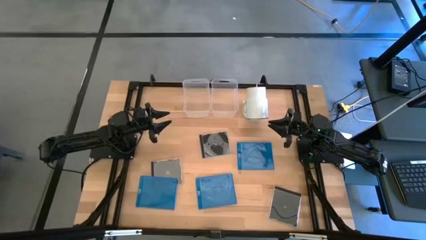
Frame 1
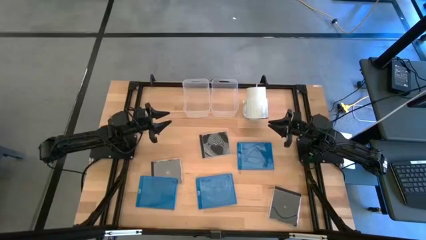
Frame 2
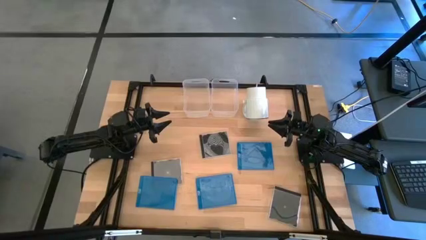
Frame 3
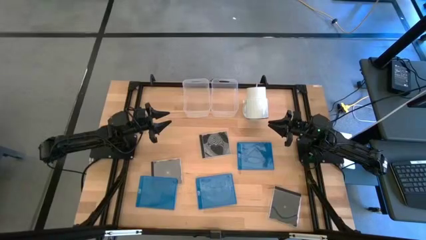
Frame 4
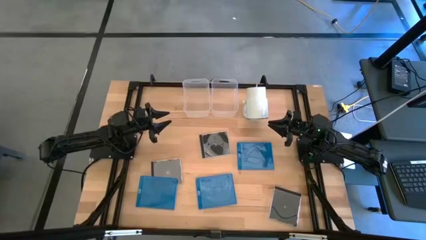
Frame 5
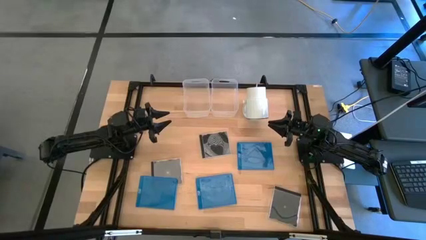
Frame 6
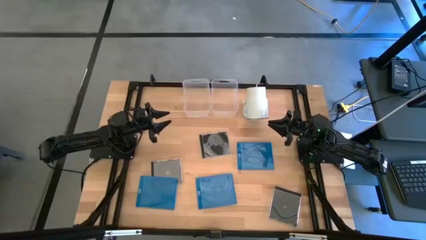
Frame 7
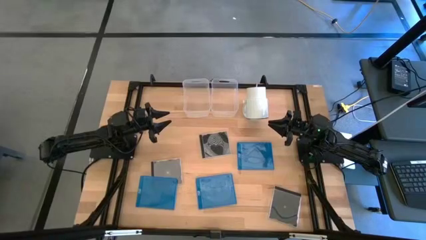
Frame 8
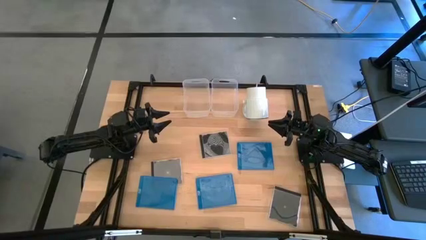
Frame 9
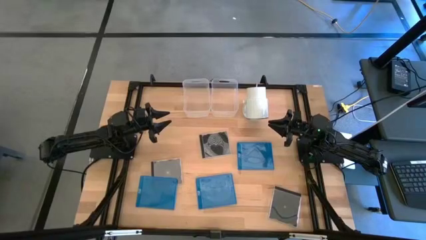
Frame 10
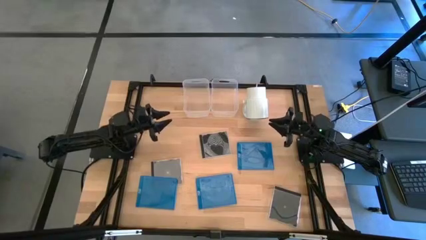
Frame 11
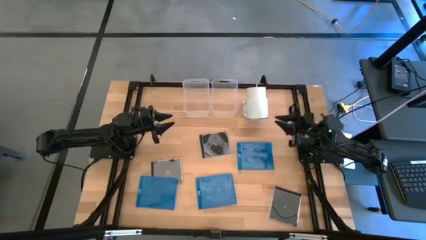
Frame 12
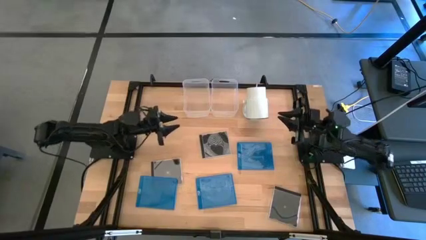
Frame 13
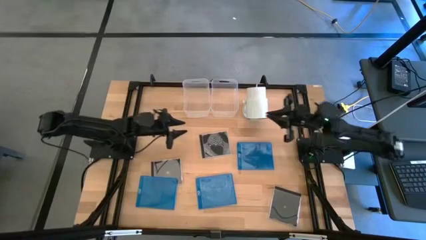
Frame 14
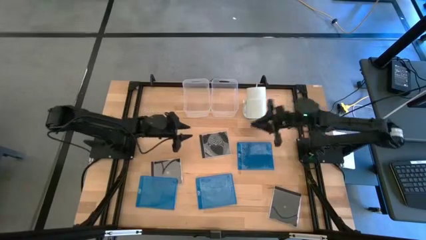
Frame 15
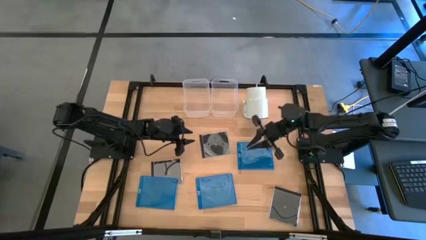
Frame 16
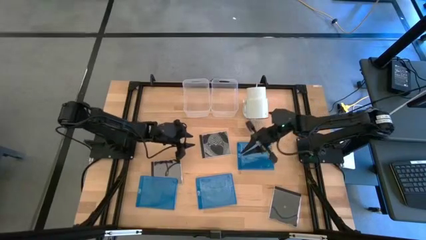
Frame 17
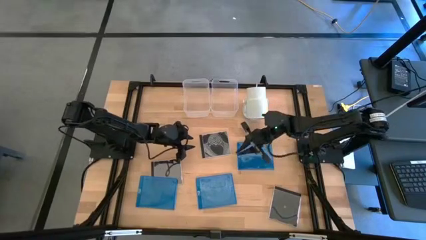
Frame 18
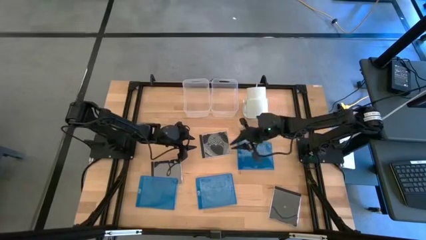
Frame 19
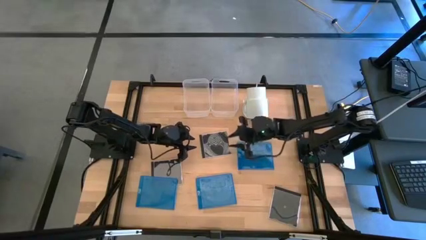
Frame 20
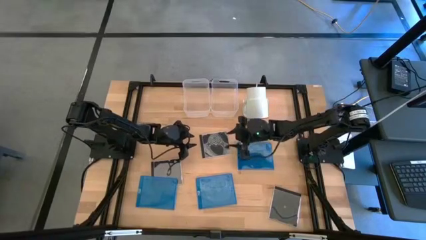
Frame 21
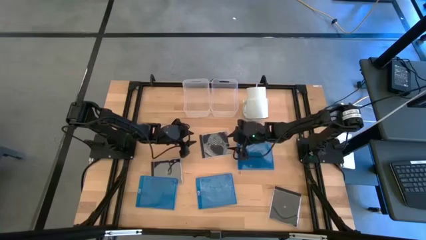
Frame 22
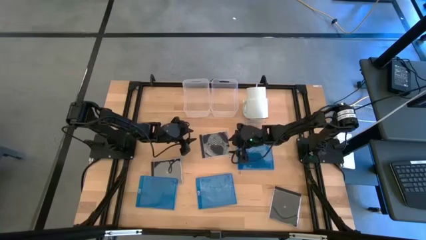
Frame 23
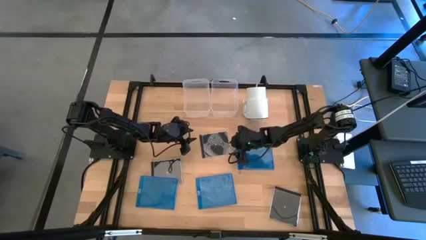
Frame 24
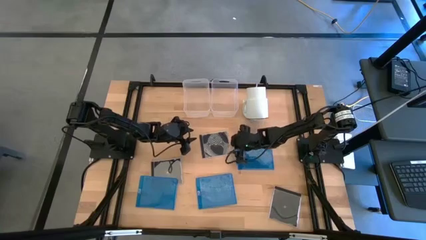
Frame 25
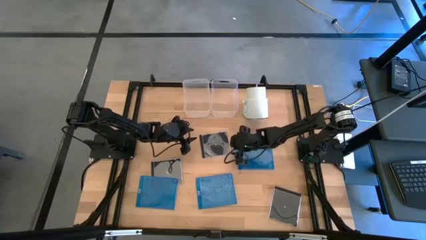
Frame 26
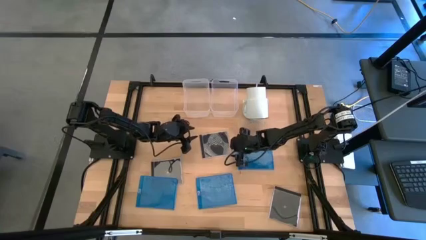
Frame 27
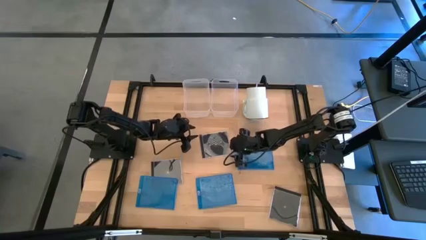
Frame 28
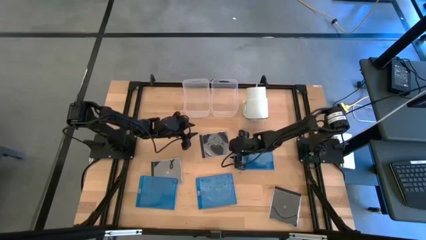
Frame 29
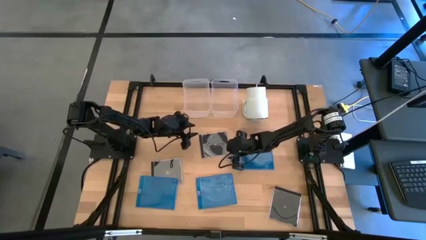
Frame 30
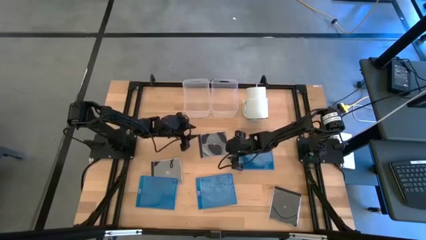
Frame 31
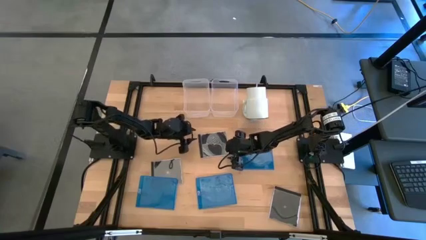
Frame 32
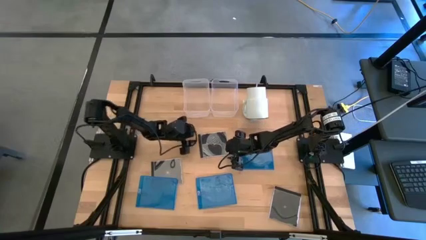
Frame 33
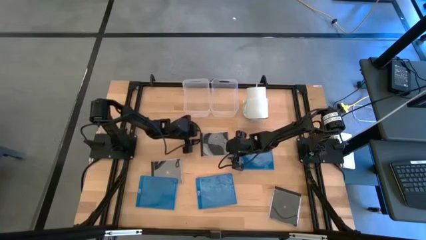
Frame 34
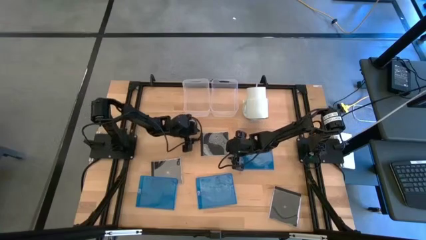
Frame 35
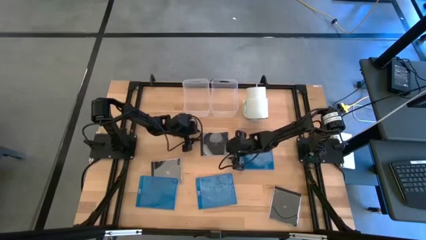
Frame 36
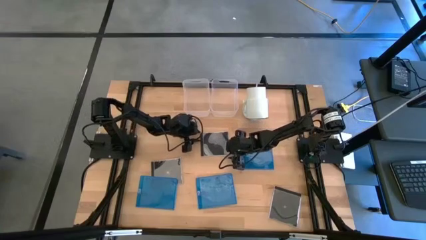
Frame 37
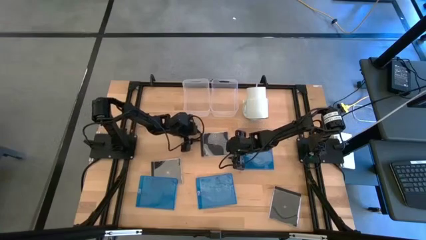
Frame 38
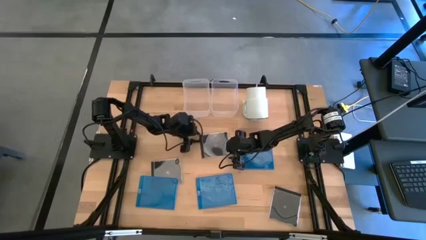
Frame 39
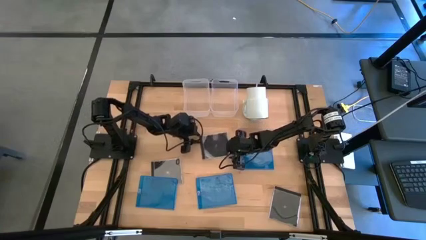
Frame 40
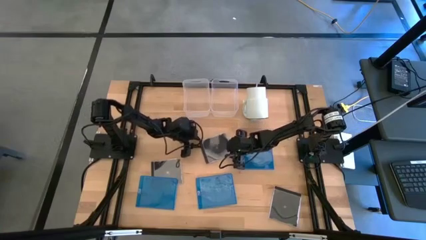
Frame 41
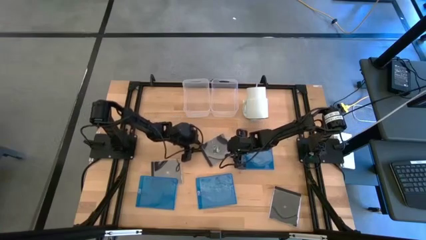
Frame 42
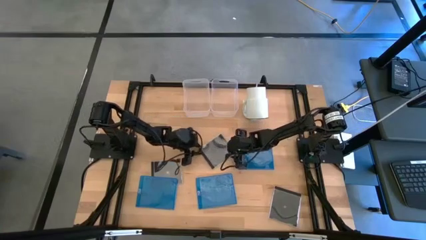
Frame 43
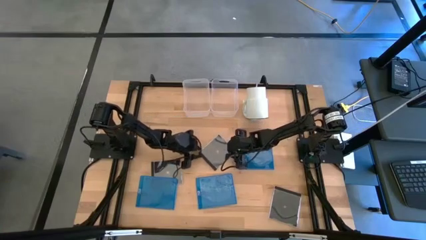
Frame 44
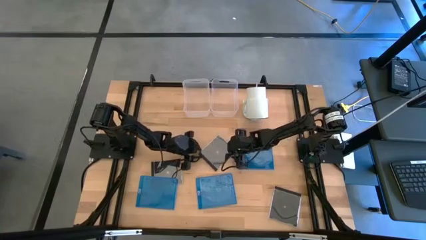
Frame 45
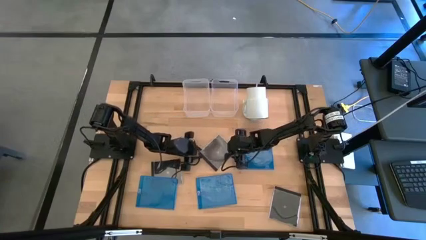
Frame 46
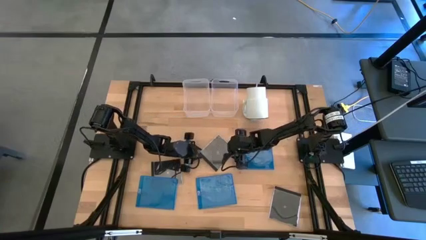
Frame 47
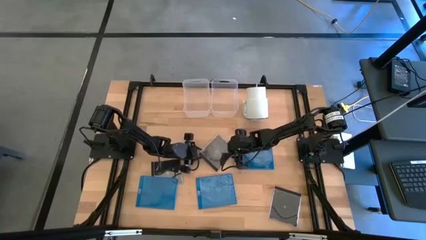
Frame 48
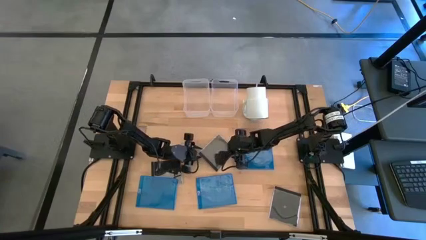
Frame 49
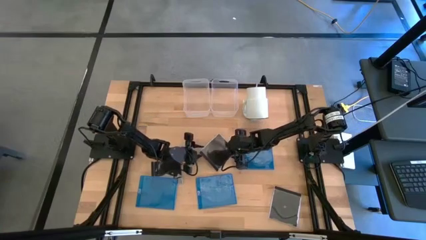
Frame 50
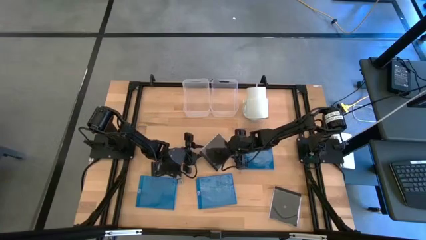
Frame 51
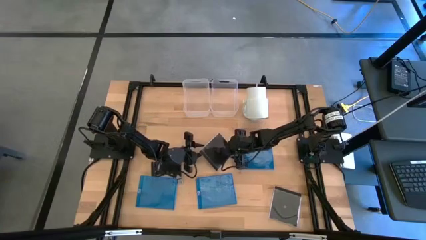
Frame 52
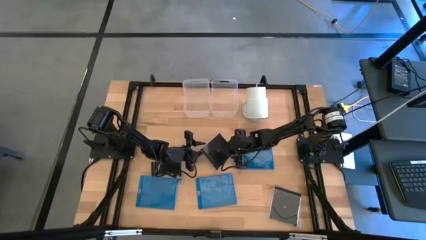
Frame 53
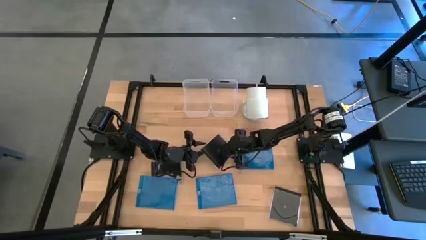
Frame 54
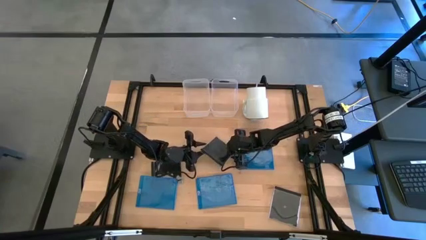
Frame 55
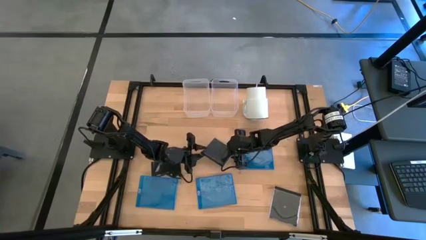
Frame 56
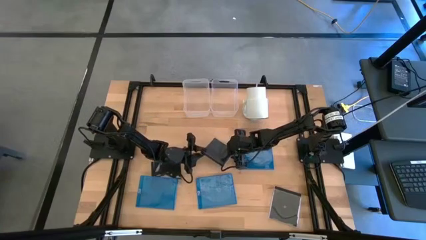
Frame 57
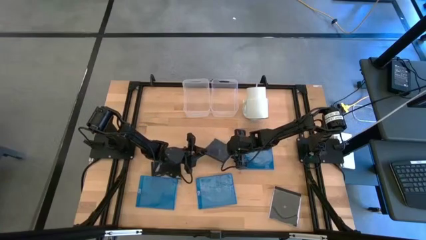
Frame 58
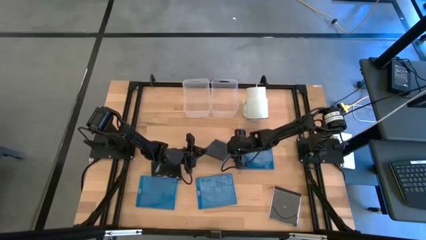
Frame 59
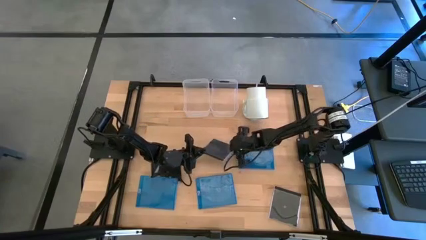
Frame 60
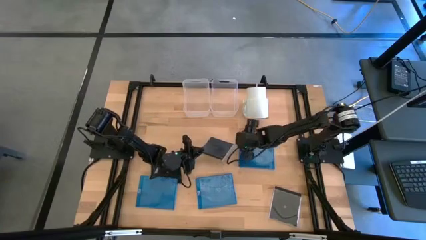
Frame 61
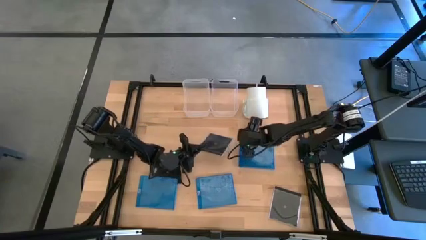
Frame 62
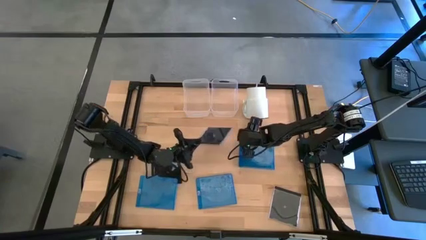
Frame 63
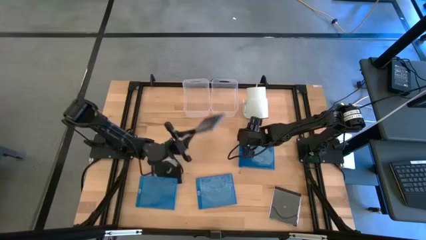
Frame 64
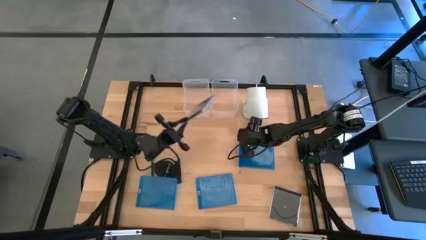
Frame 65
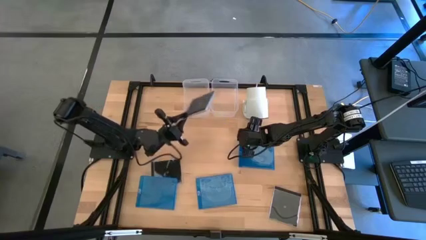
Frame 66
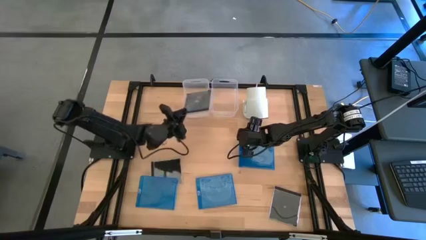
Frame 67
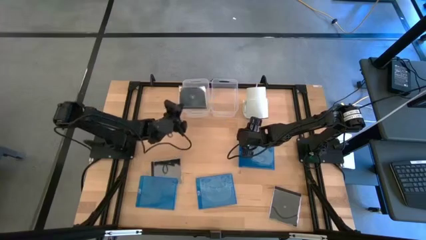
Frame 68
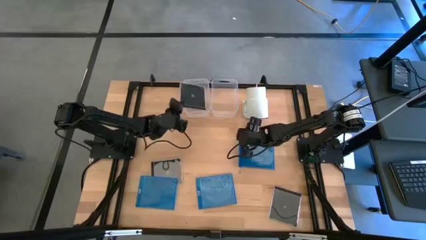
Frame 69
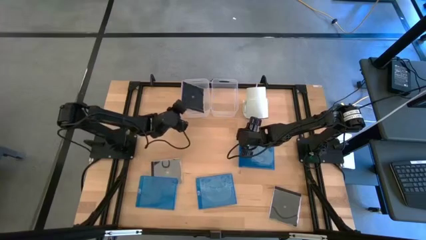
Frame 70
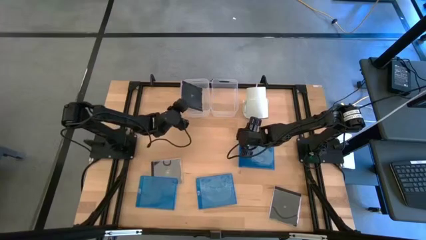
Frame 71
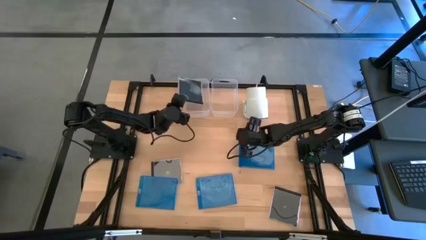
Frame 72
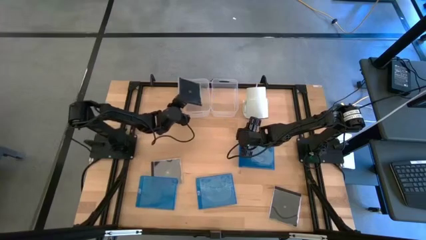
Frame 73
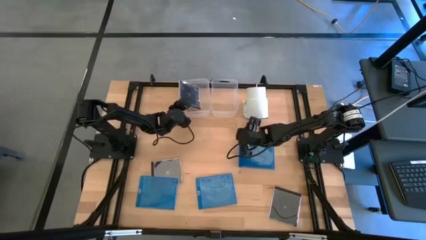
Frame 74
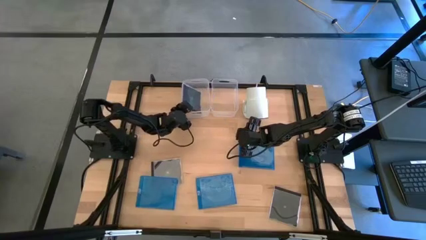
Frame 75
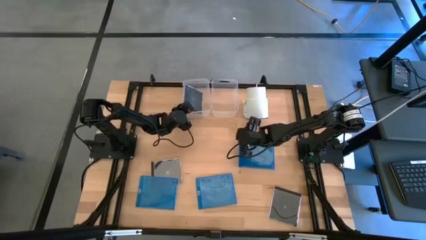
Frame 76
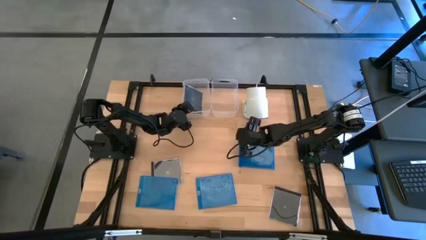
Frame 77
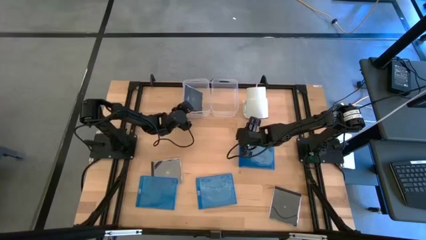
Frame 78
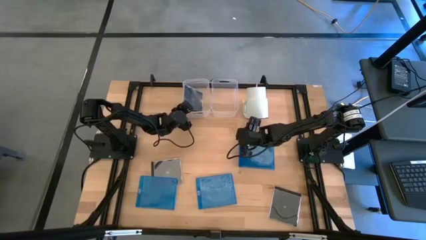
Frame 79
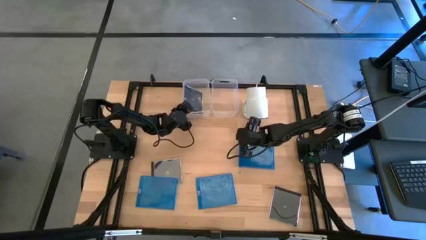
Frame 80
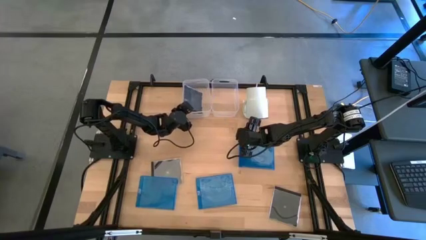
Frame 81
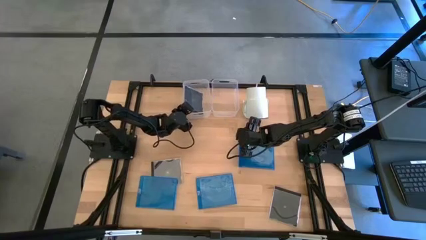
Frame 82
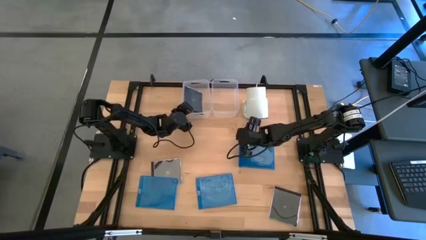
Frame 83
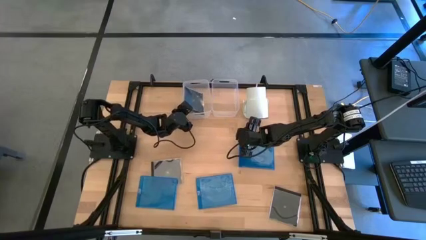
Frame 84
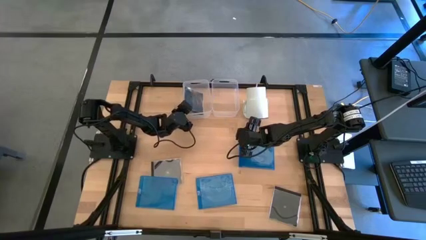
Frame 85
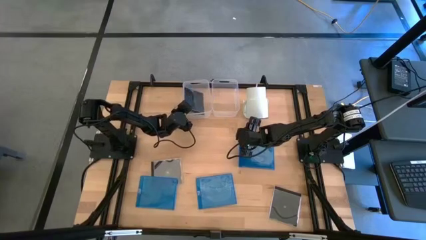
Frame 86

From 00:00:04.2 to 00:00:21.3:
Task: Pick & place jewel cases by type
Put the top black CD case into the left transparent bin
